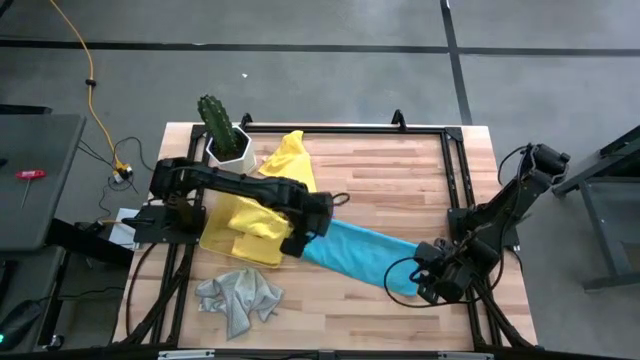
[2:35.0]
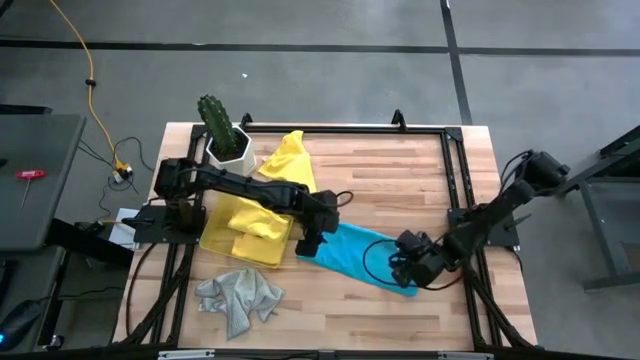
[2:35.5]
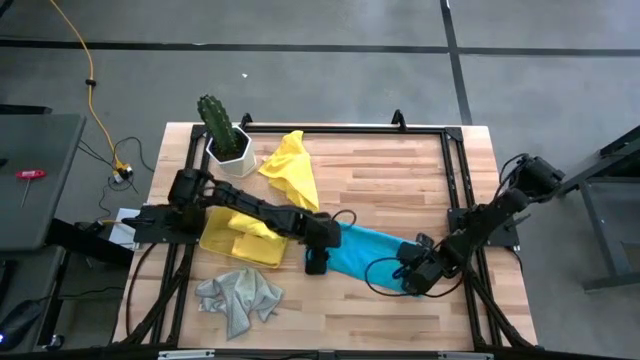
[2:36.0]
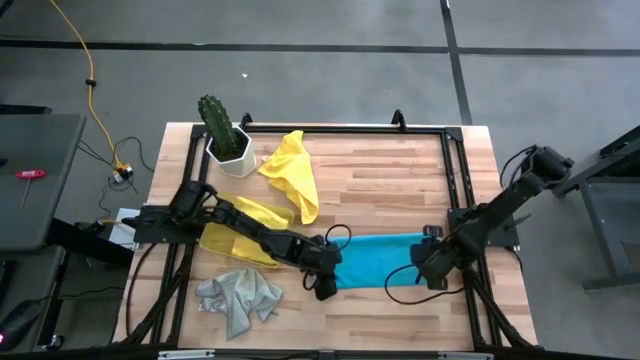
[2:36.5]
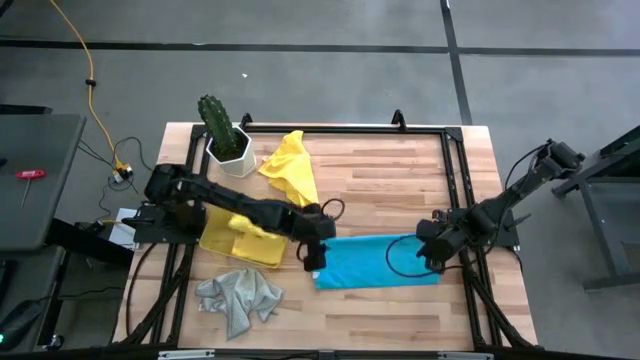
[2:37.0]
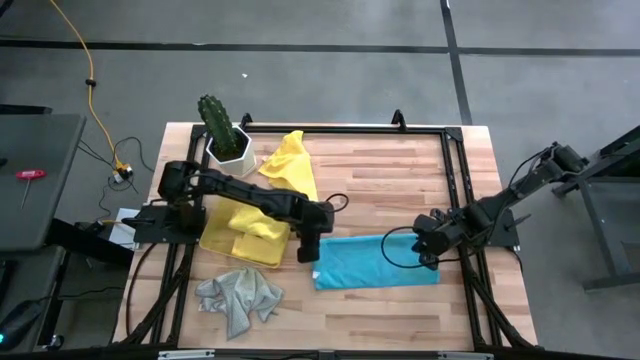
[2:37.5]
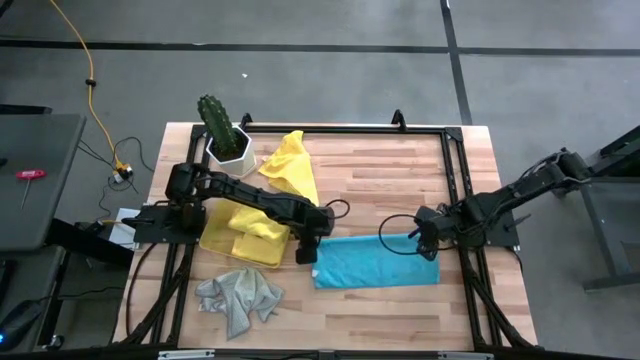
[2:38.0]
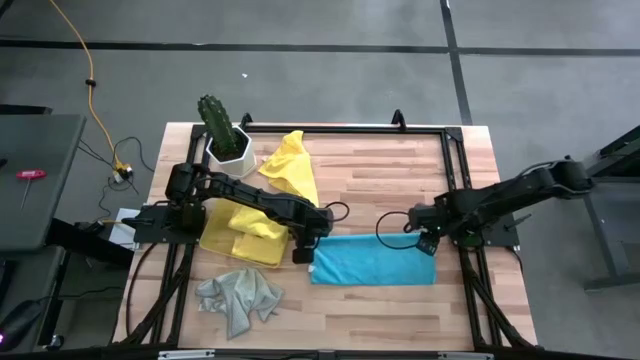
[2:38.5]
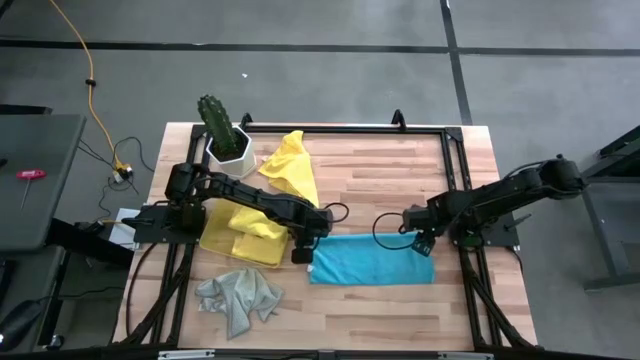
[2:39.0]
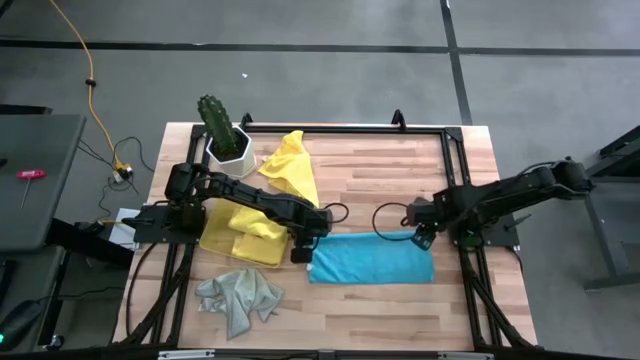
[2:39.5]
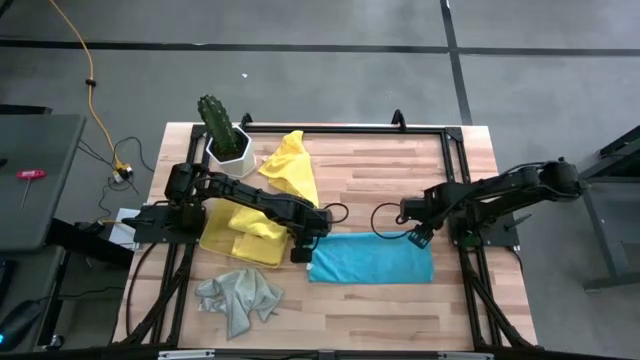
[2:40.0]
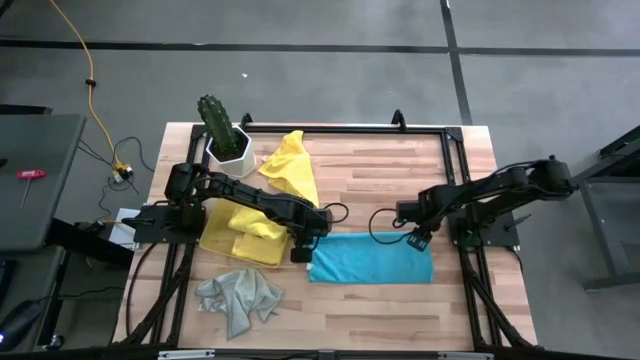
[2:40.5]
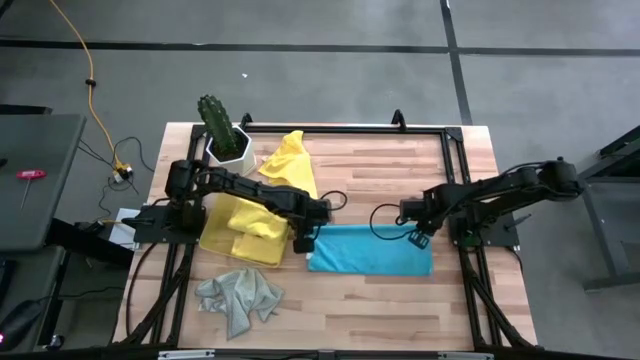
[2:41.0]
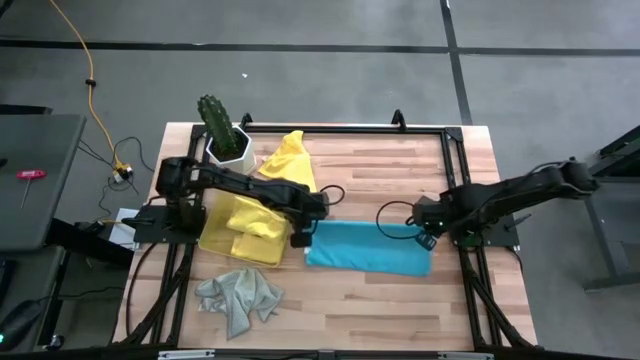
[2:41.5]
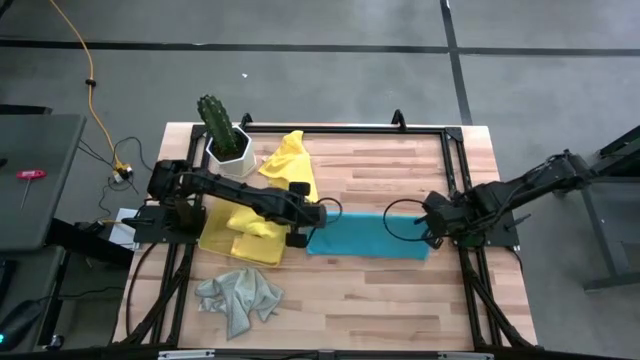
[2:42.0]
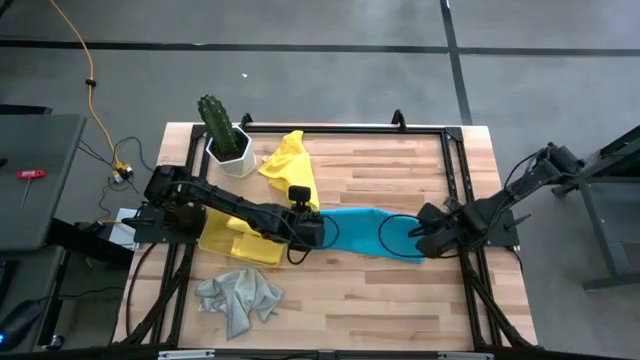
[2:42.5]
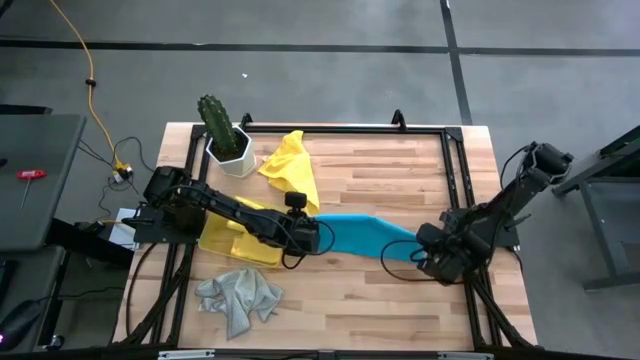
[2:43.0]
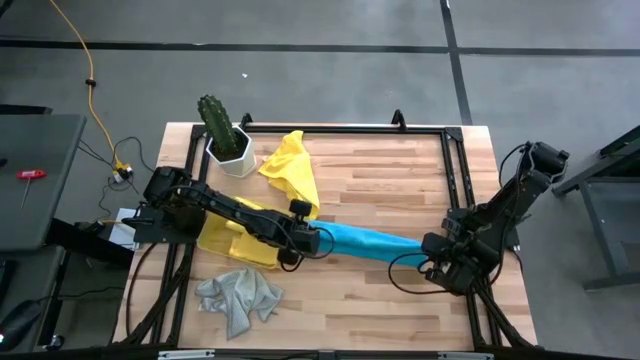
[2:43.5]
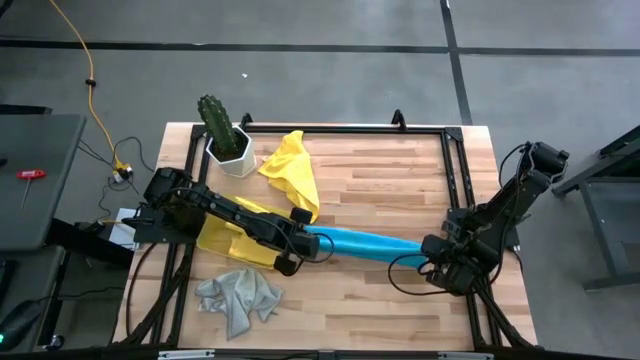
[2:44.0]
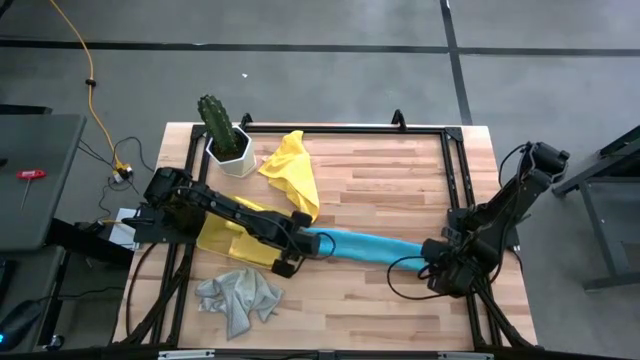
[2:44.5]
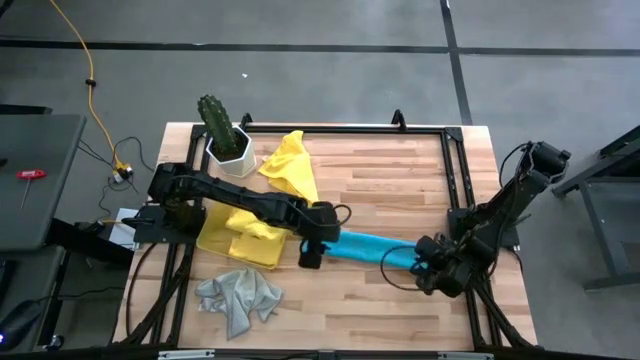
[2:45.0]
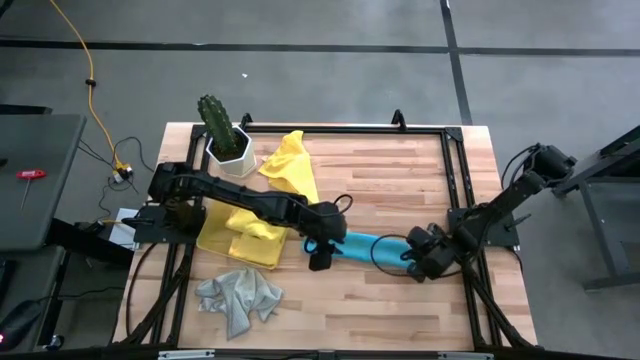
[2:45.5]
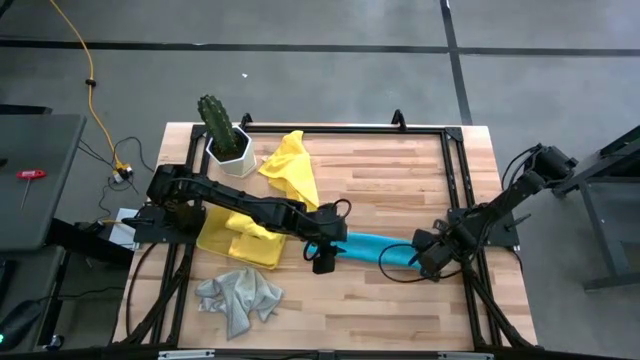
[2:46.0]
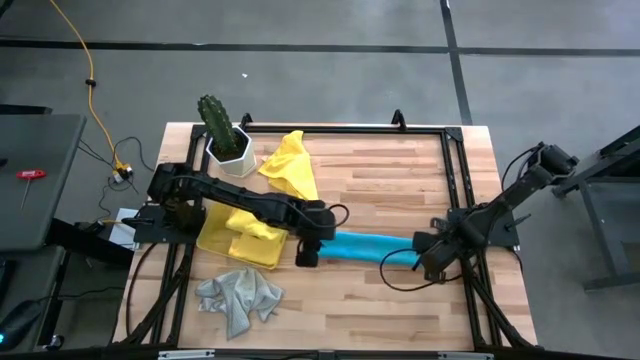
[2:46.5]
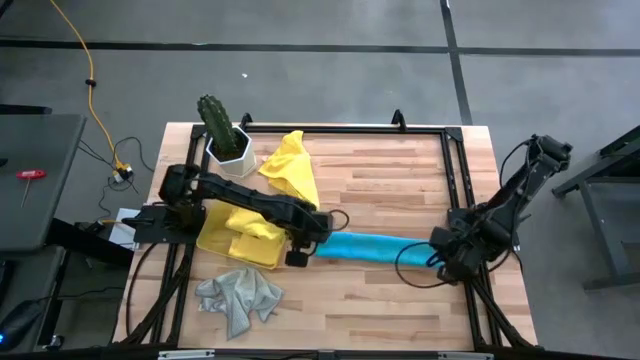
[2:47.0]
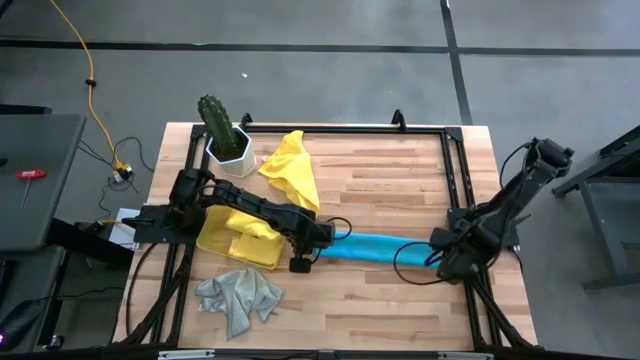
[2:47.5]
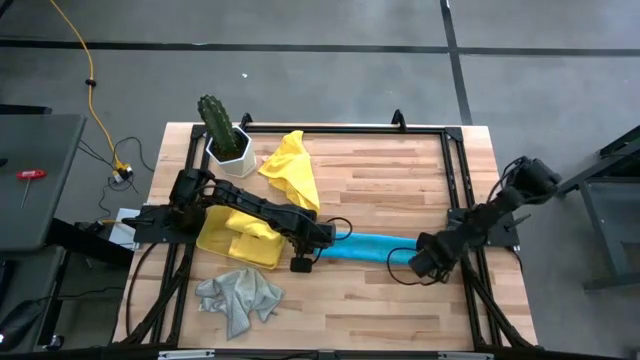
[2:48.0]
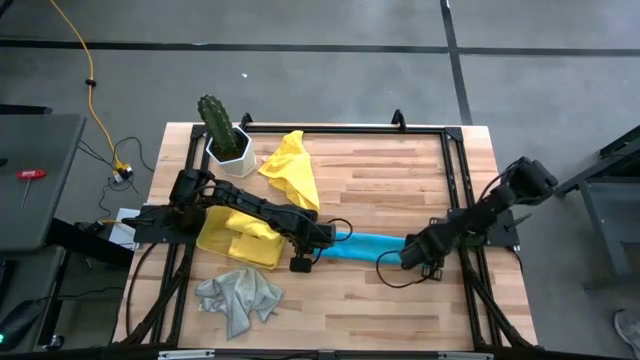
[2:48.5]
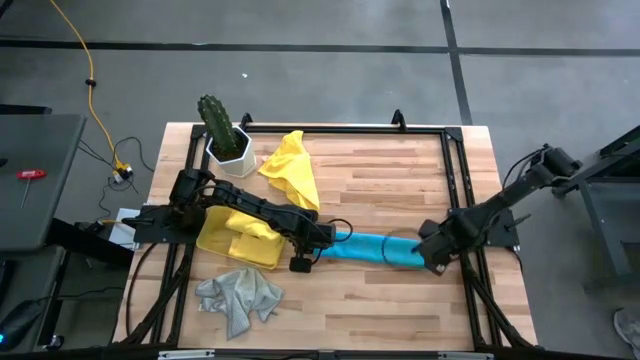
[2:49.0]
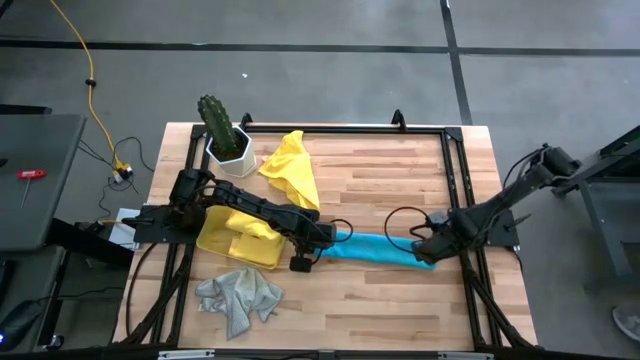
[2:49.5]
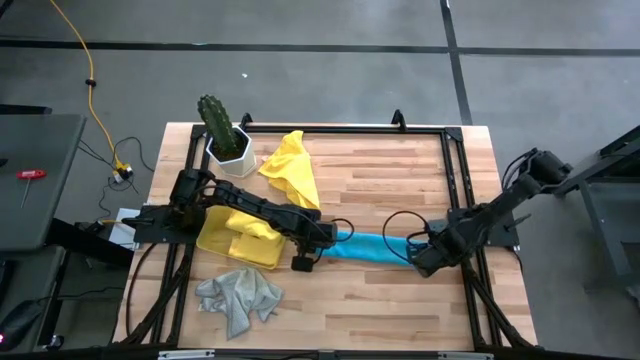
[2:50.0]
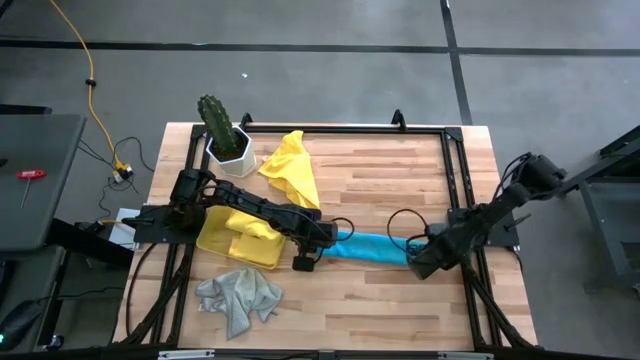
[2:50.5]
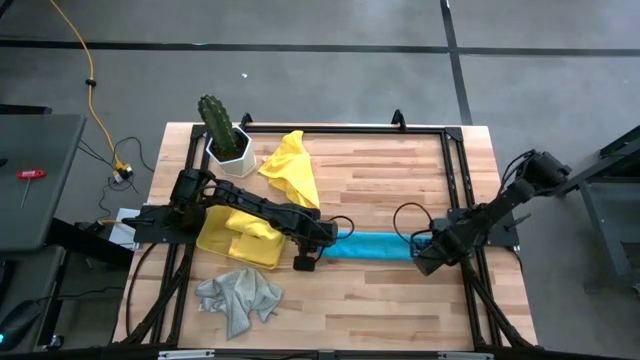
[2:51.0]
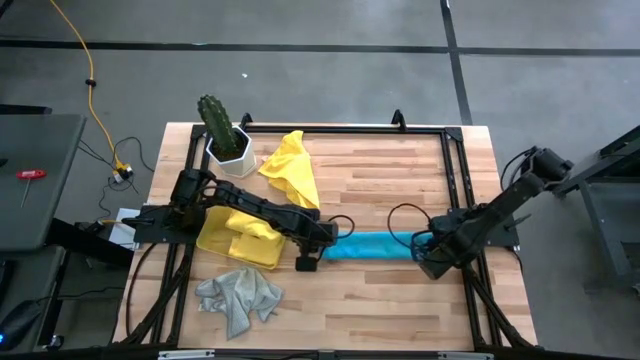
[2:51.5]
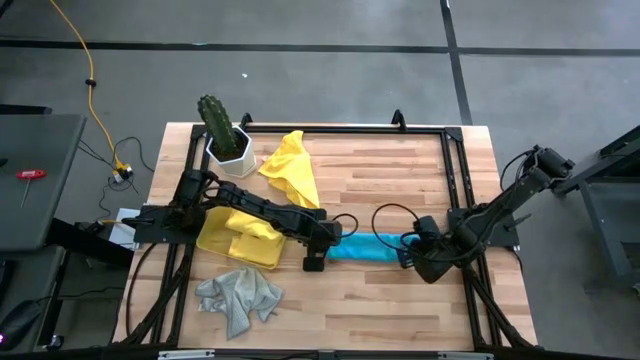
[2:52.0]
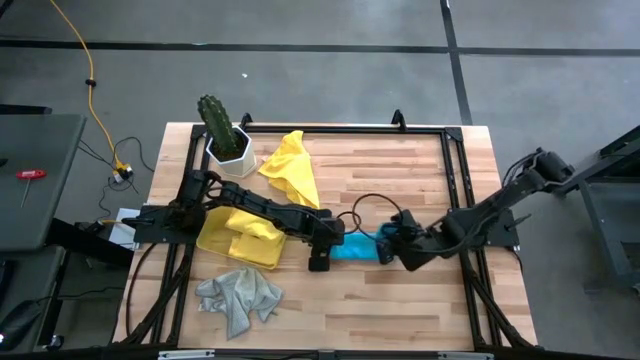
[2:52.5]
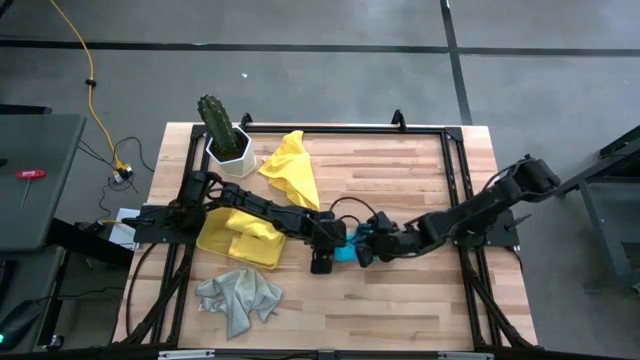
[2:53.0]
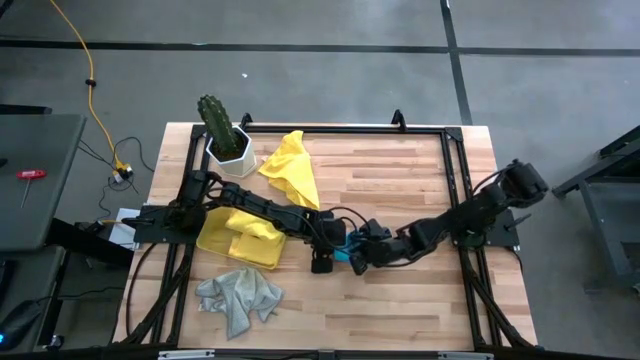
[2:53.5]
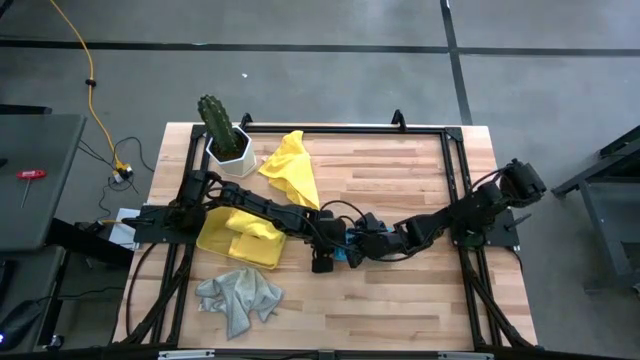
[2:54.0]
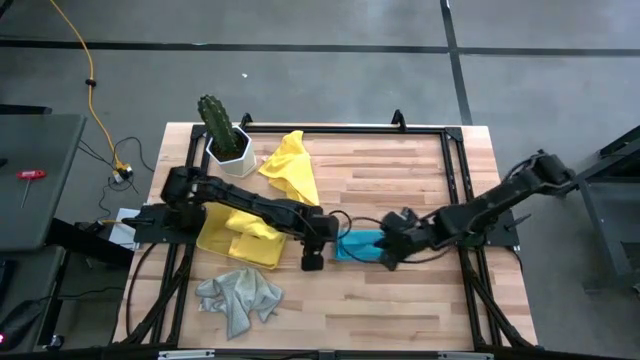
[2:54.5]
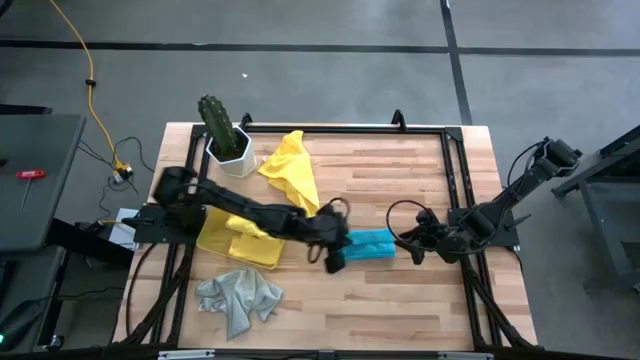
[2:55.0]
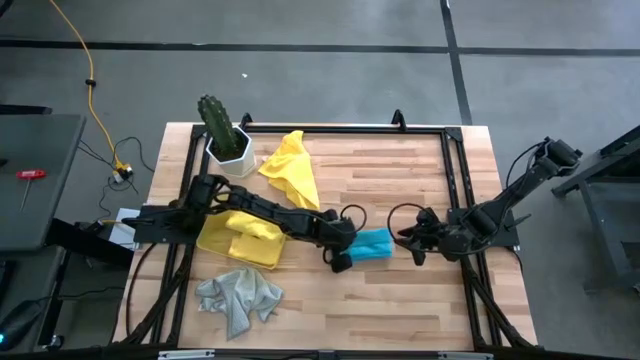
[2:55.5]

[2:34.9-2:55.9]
Task: Fold microfiber towels
Fold the blue microfiber towel
